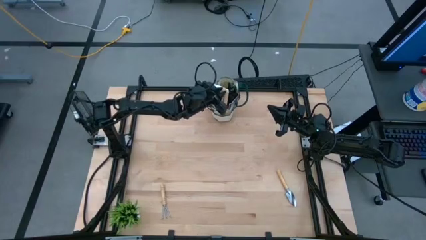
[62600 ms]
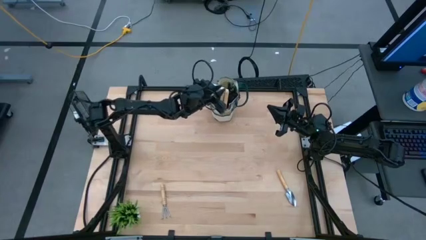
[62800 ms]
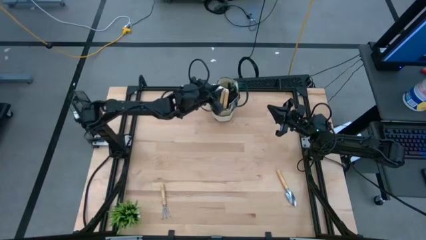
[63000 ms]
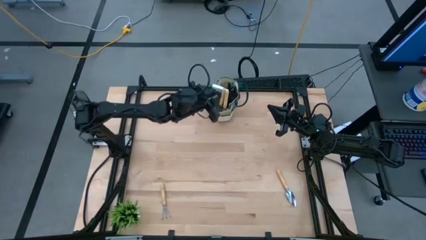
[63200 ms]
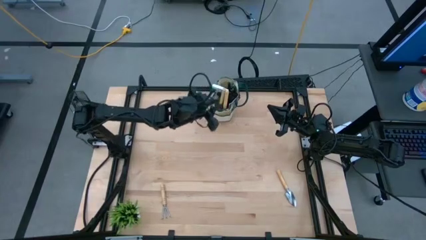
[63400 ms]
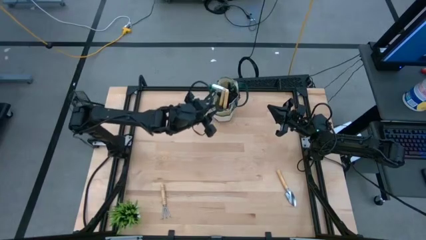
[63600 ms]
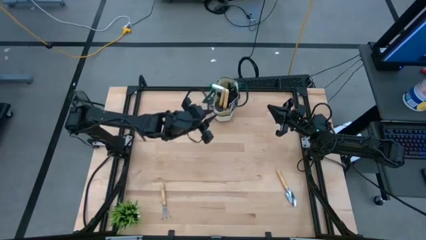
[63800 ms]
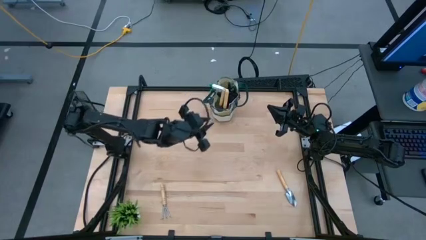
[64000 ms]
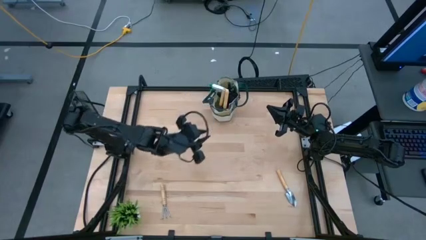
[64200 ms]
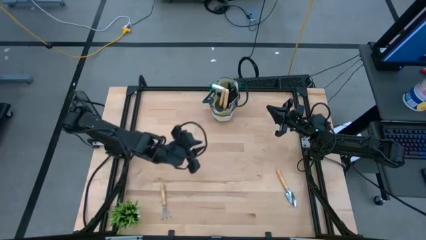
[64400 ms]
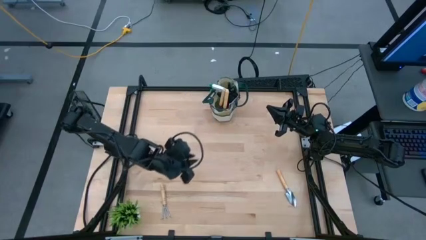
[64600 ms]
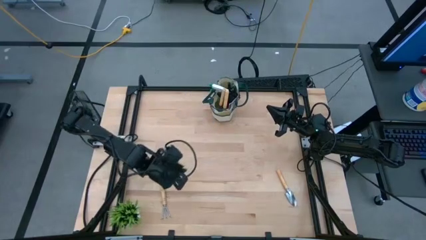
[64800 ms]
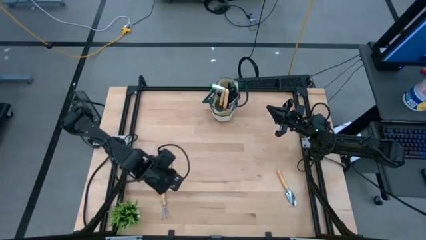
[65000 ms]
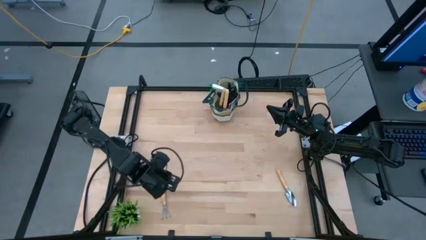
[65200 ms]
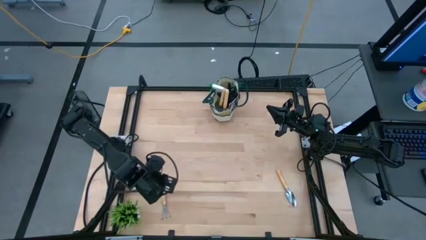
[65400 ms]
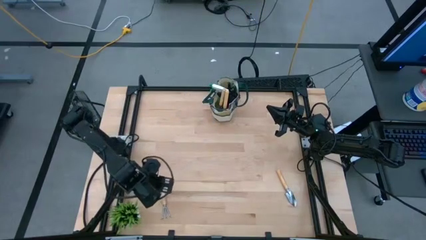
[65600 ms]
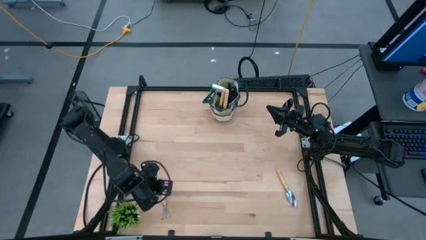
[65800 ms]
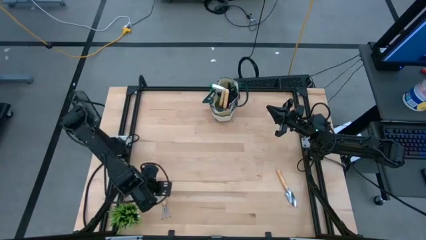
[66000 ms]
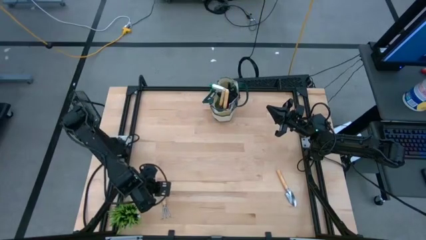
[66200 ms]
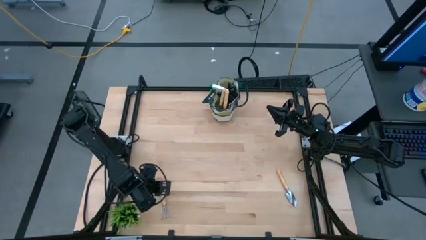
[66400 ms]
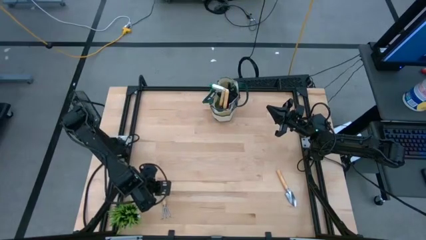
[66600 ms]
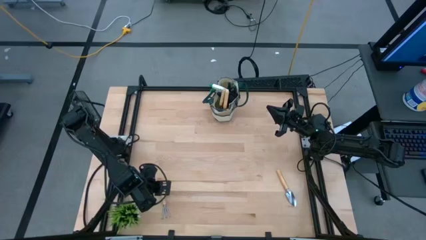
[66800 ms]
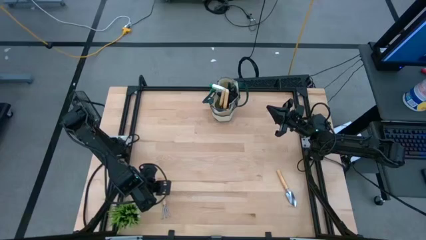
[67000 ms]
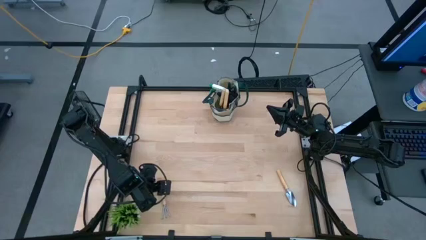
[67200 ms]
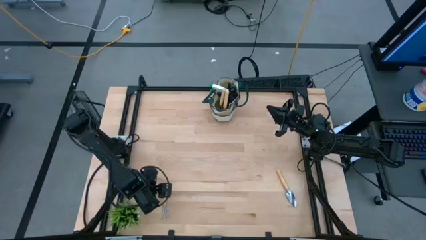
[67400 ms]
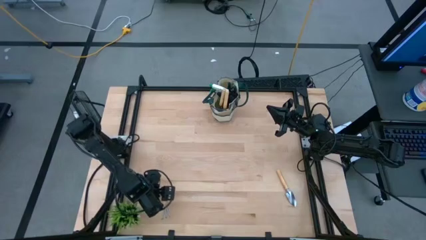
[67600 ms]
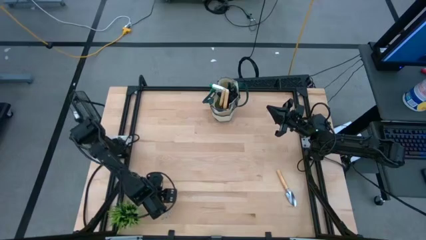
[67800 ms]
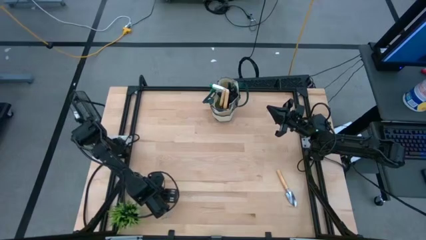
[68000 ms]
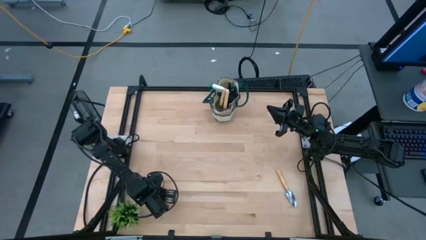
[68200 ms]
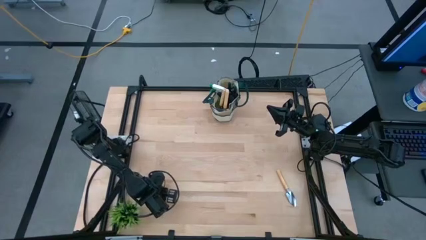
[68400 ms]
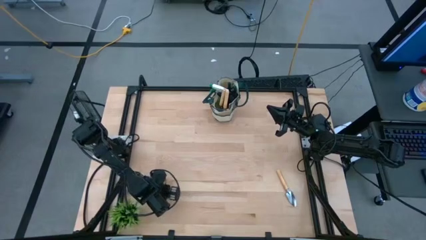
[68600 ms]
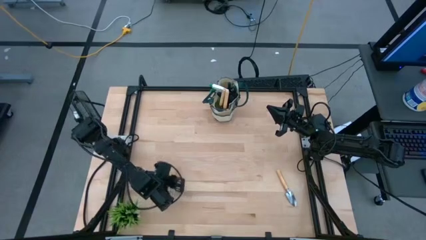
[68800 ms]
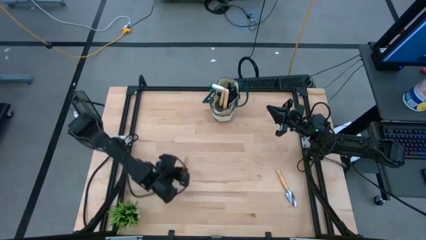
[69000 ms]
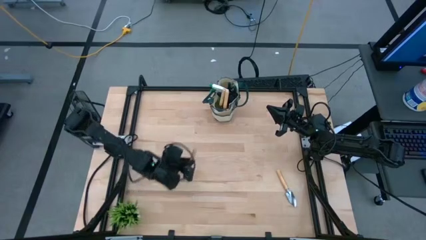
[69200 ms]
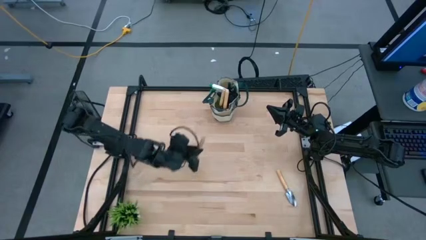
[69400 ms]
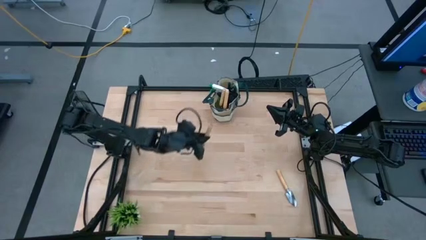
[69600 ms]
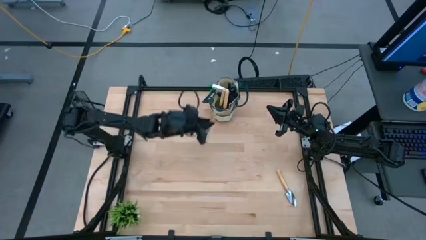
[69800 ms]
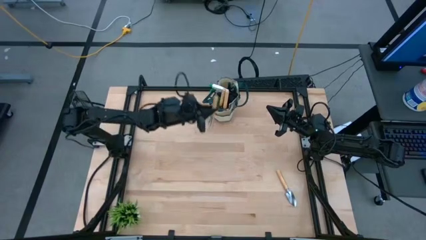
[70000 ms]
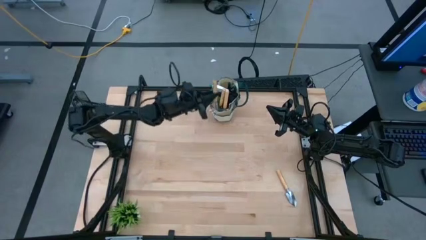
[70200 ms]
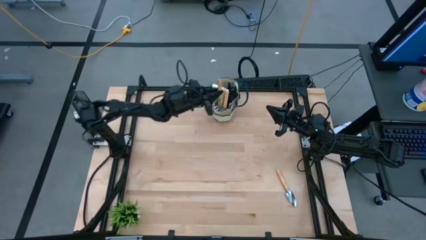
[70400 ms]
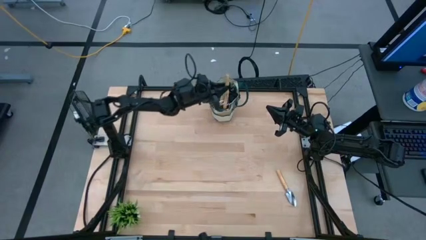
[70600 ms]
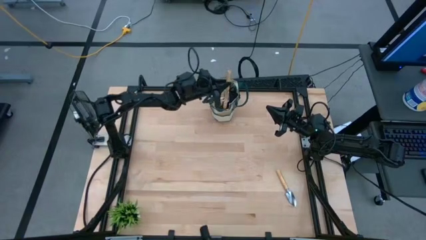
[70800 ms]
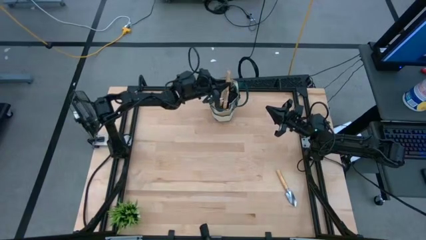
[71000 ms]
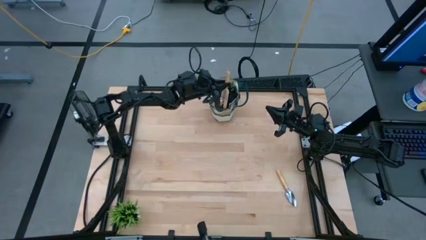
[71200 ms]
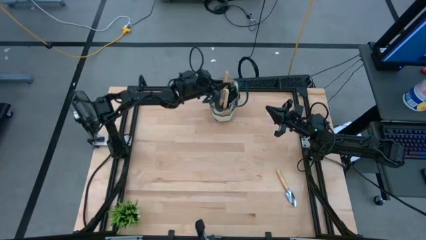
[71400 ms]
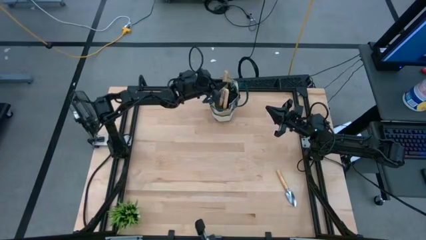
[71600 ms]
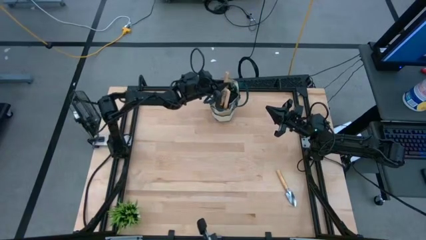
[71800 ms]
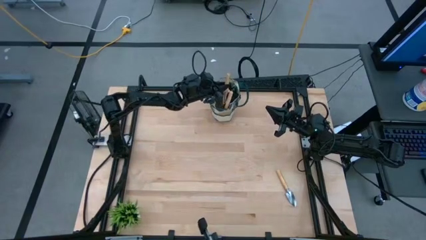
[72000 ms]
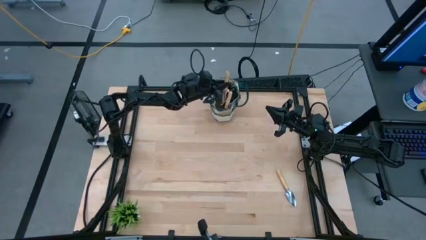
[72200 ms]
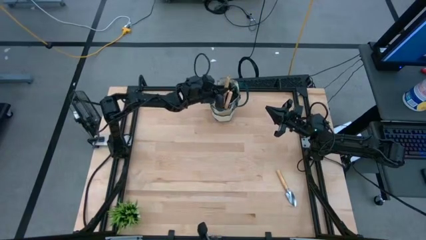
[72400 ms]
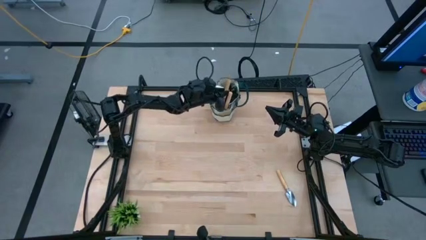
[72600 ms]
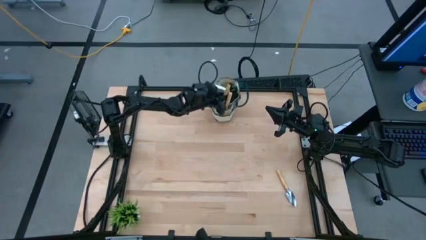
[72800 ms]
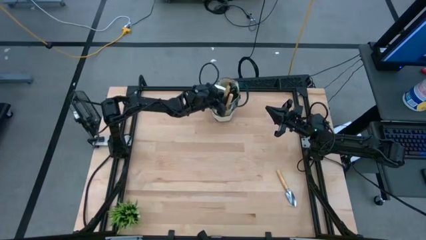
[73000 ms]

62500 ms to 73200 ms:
Task: Pick & Place Garden tools in Gardening bag
Put the hand rake into the gardening bag

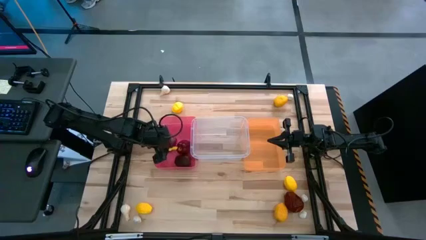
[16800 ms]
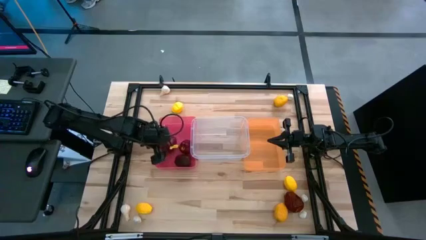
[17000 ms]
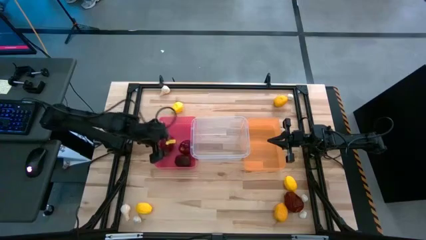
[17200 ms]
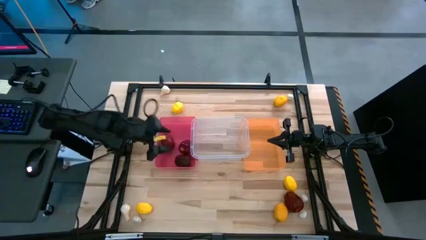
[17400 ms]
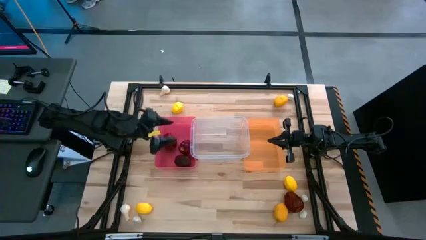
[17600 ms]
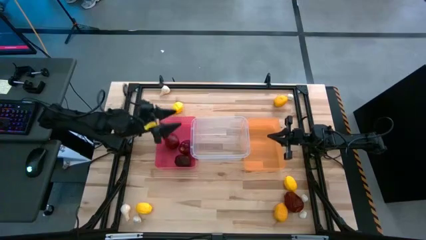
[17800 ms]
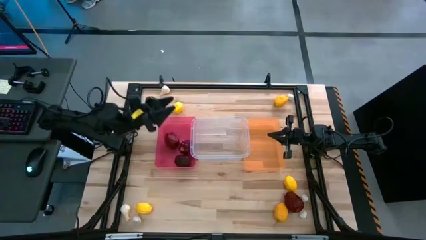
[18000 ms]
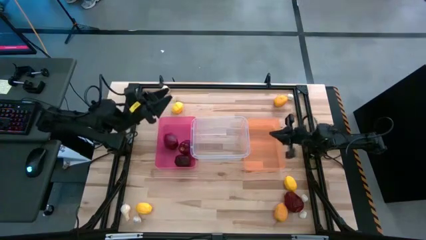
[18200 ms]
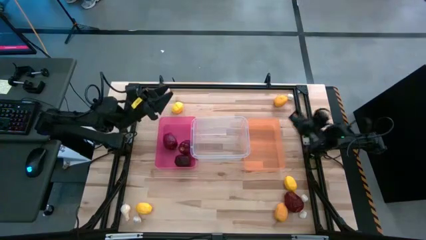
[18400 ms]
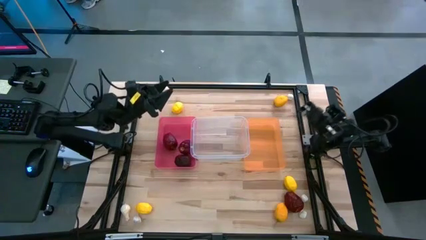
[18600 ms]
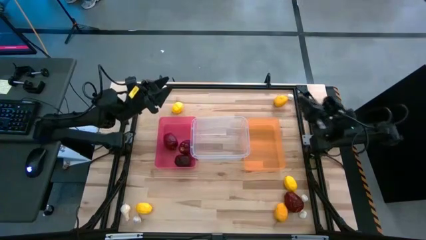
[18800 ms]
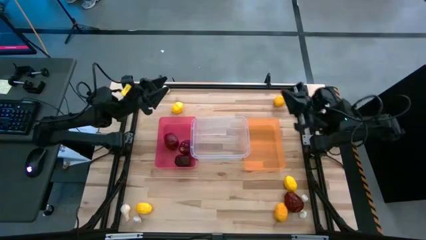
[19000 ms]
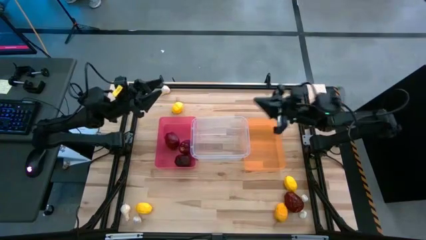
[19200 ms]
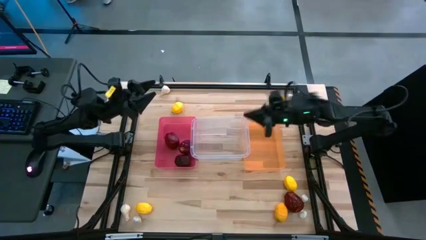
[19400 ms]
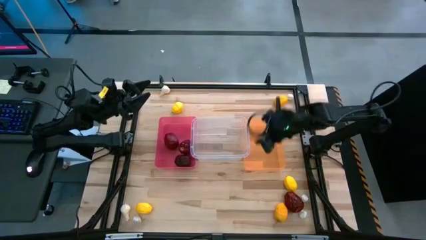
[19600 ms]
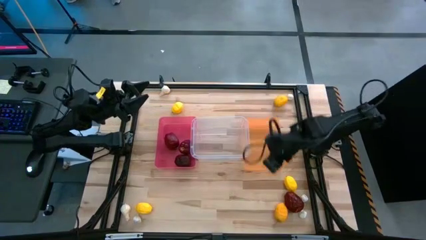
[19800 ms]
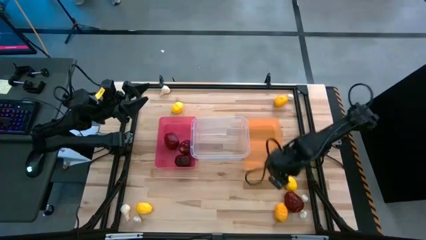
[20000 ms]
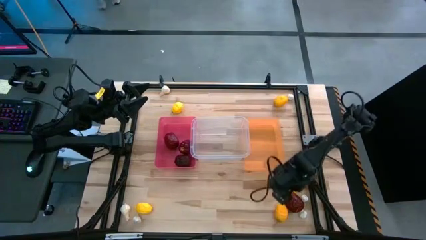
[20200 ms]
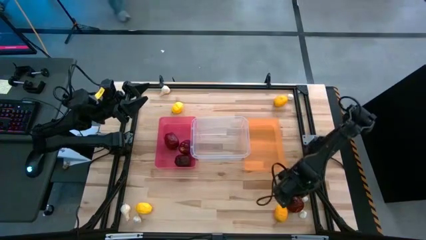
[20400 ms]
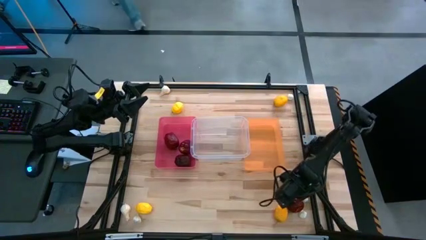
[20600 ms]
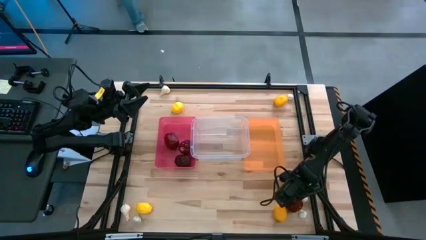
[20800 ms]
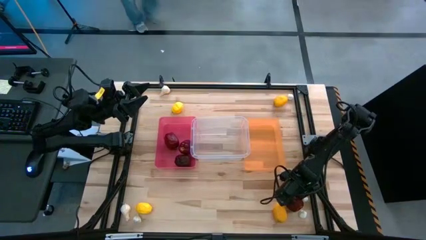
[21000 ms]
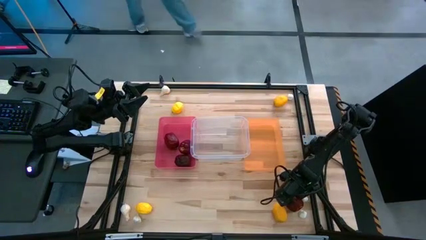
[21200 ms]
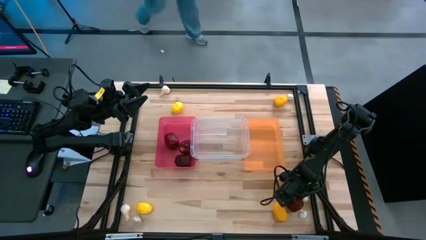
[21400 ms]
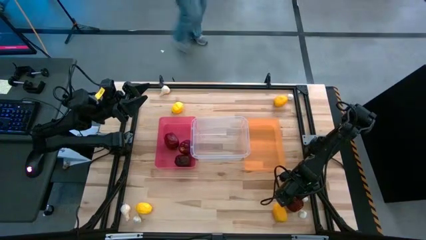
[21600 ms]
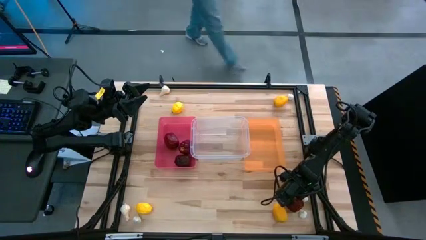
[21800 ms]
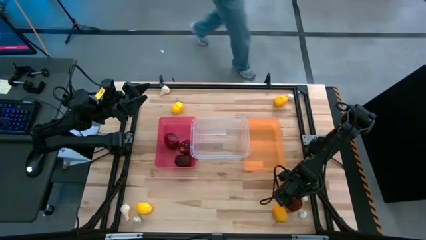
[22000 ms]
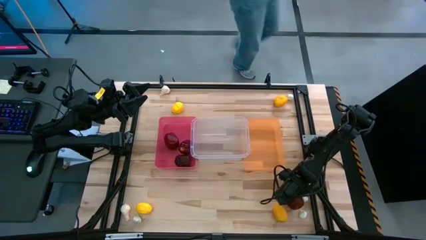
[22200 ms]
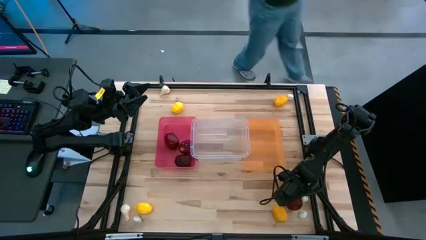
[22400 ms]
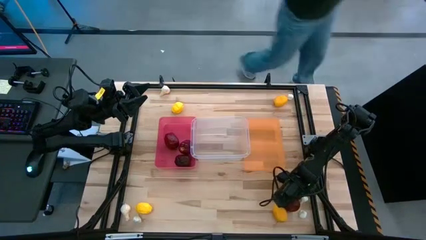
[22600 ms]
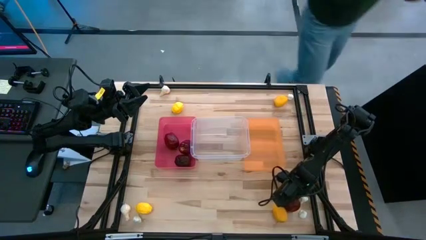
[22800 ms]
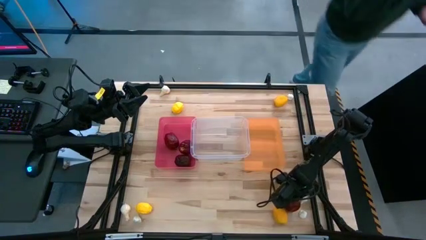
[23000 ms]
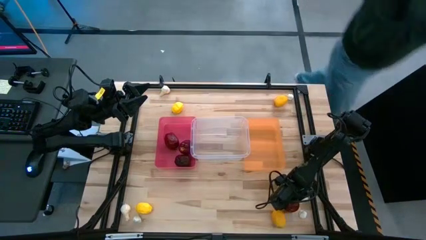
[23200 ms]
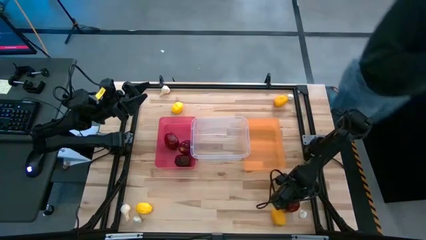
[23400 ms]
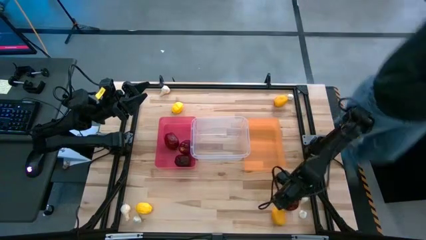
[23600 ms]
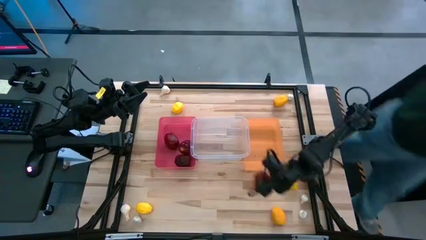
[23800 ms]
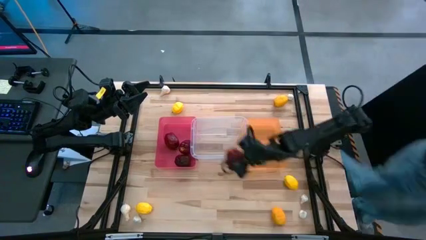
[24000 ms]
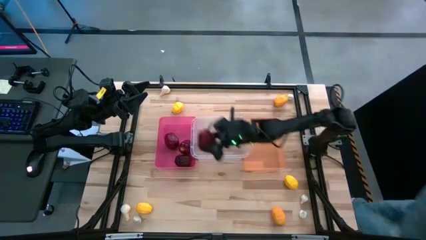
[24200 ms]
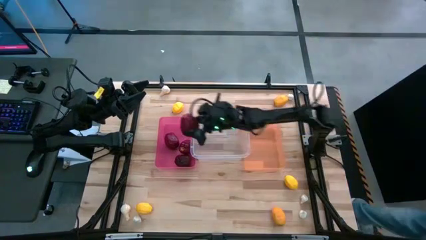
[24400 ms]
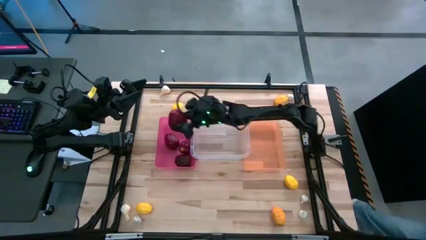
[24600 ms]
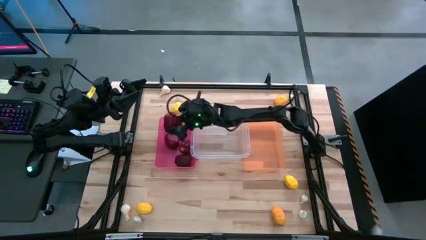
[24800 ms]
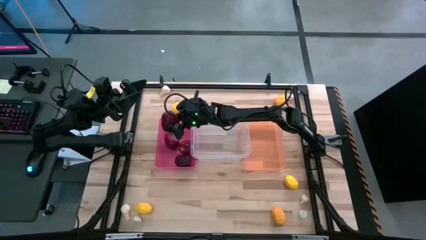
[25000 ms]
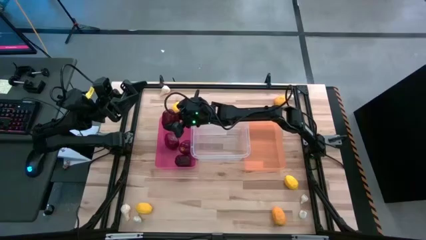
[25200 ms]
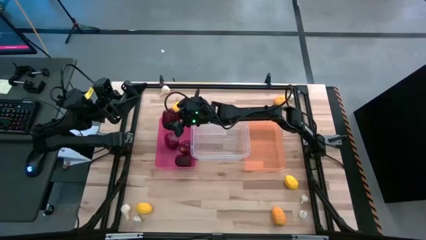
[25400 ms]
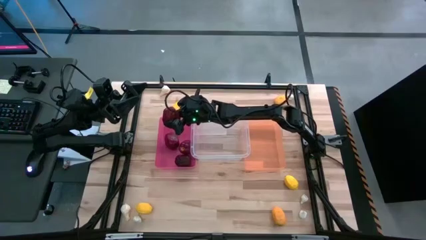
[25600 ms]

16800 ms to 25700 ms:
Task: Sort produce into baskets
Put the red apple into the pink bin
